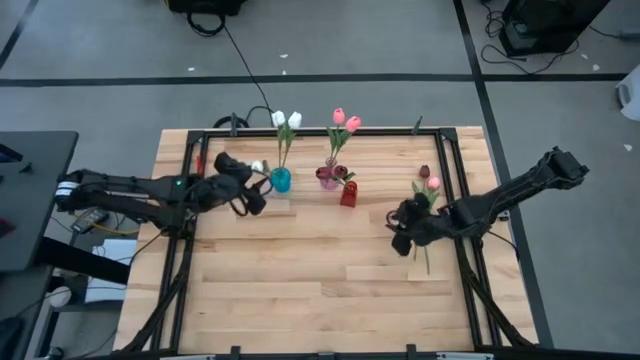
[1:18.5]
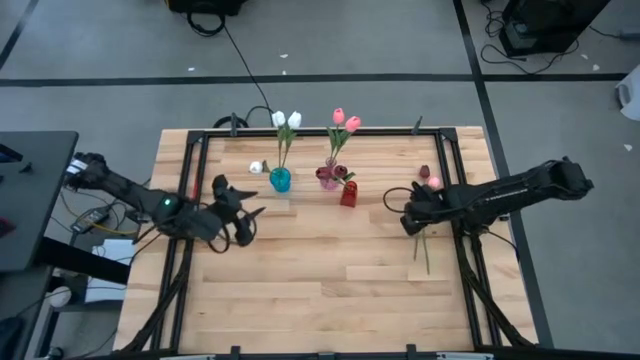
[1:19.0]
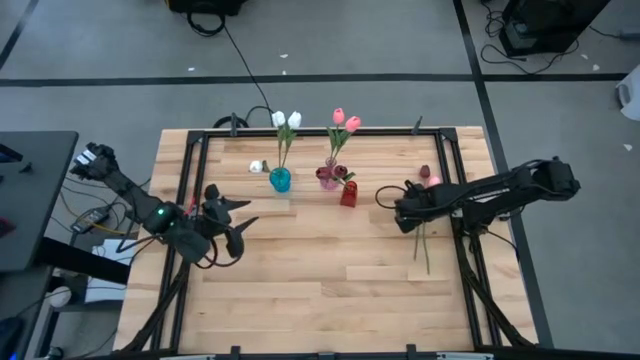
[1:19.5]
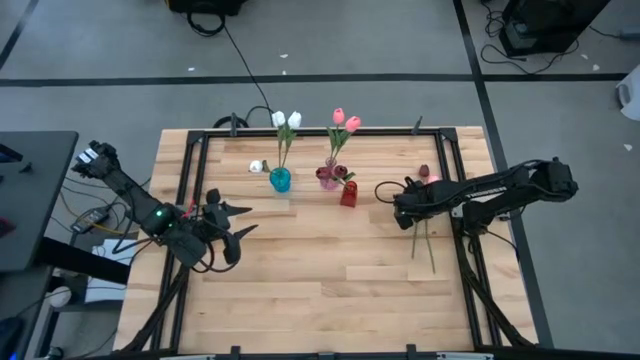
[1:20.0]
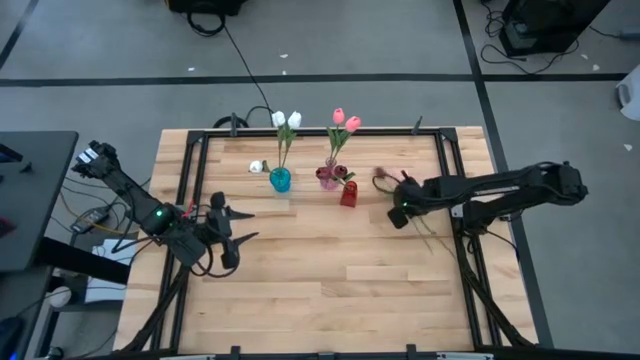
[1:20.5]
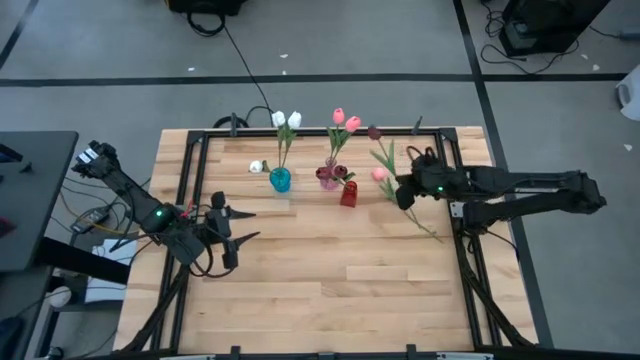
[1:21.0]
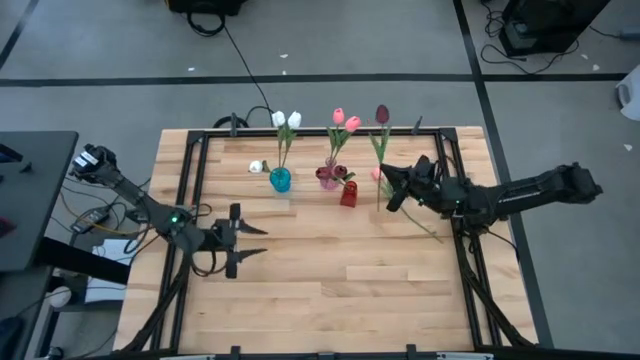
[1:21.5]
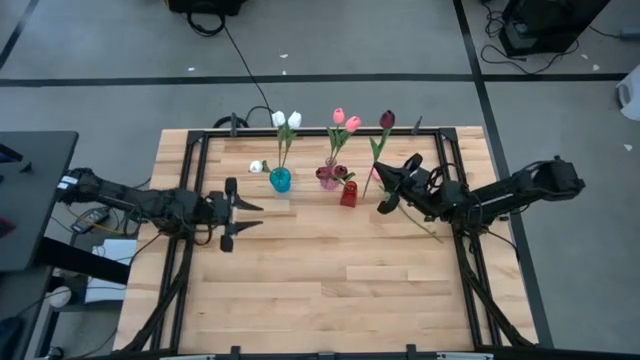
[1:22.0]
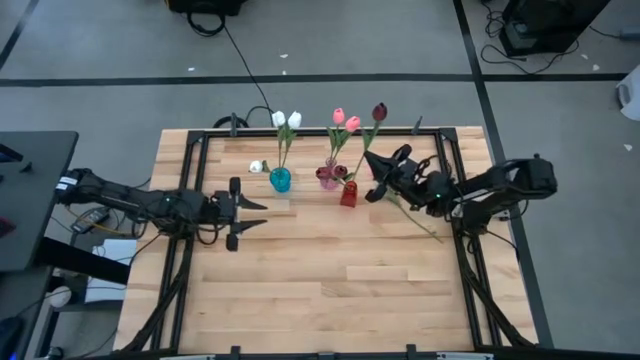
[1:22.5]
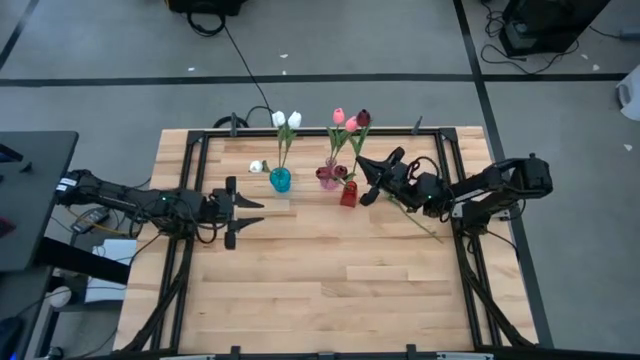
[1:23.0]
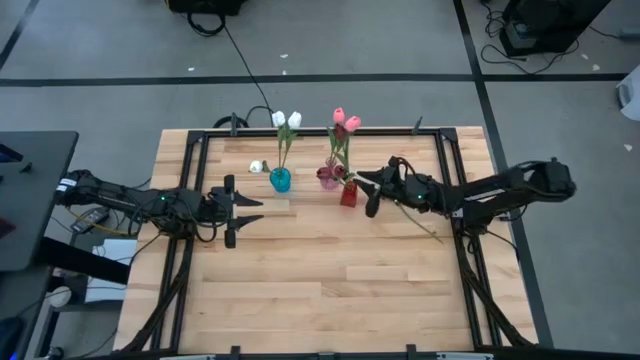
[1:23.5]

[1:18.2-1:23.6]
Task: Sort flowers into vase by color
Put the red tulip into the red vase

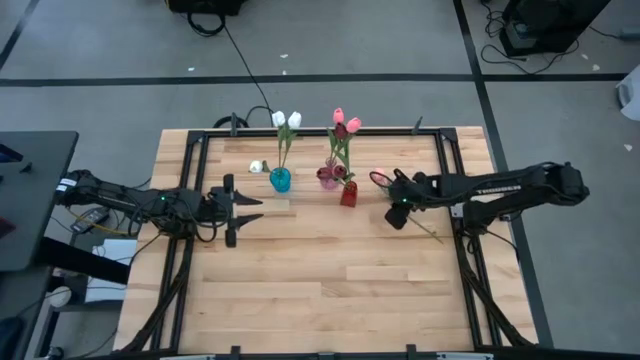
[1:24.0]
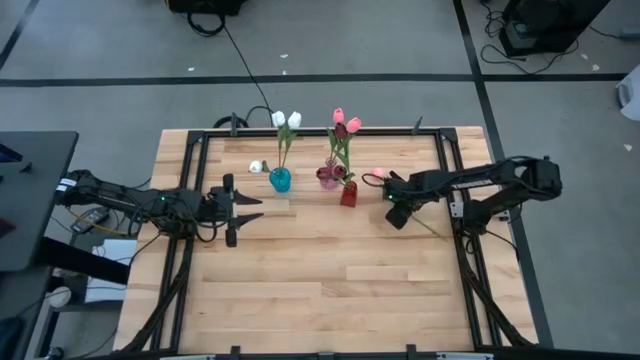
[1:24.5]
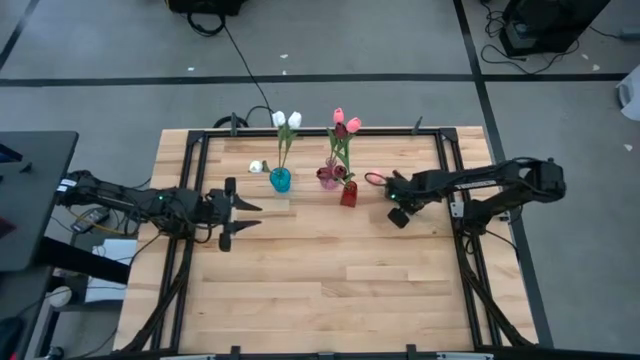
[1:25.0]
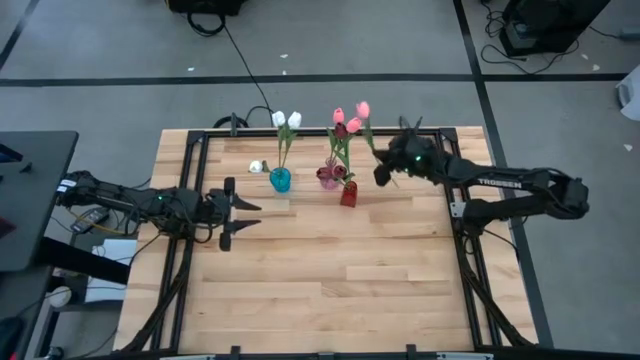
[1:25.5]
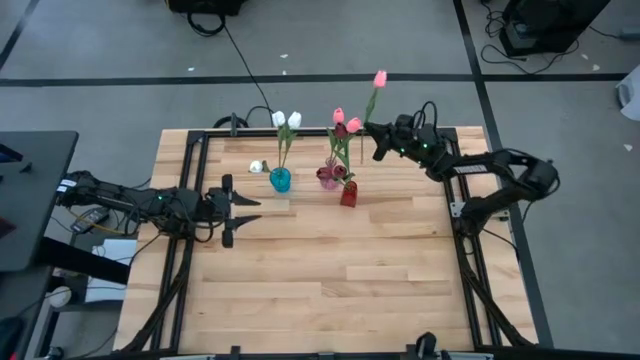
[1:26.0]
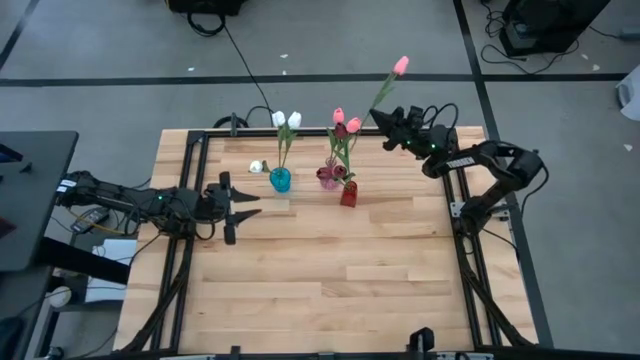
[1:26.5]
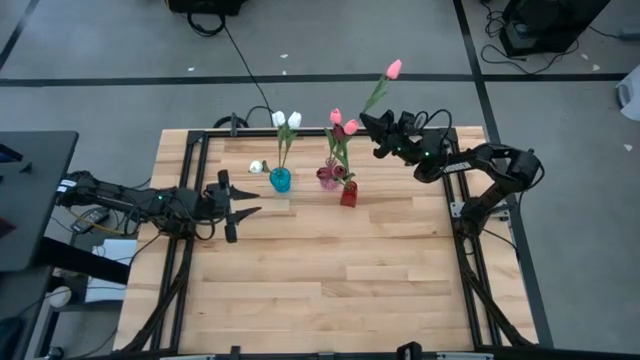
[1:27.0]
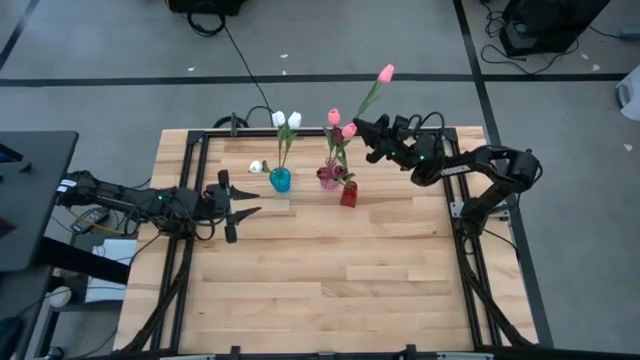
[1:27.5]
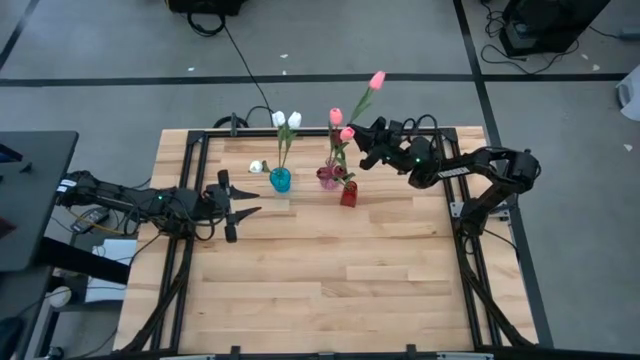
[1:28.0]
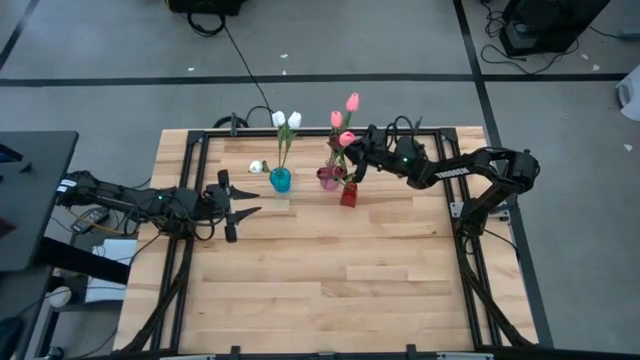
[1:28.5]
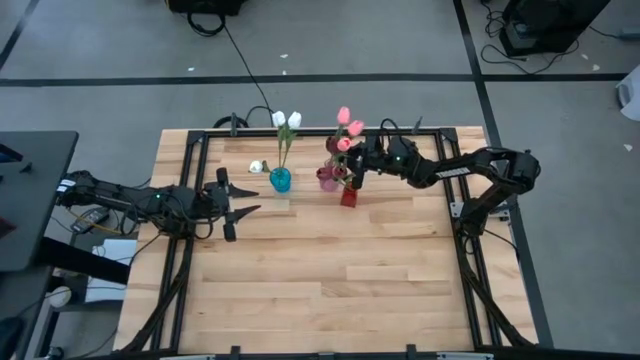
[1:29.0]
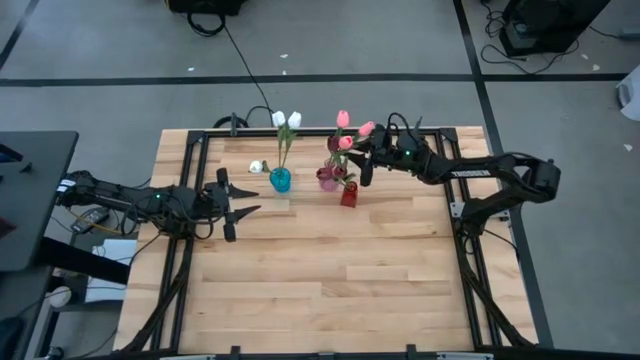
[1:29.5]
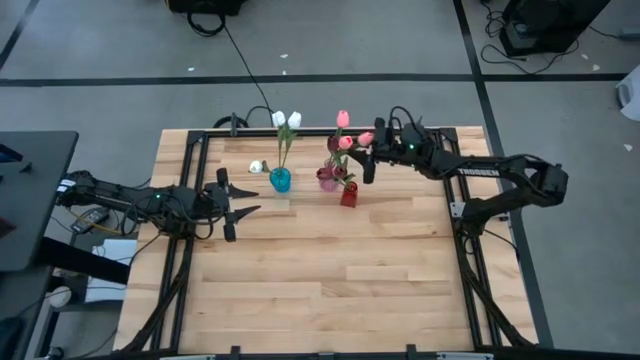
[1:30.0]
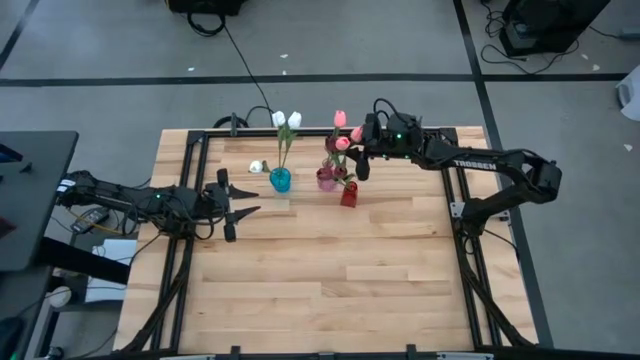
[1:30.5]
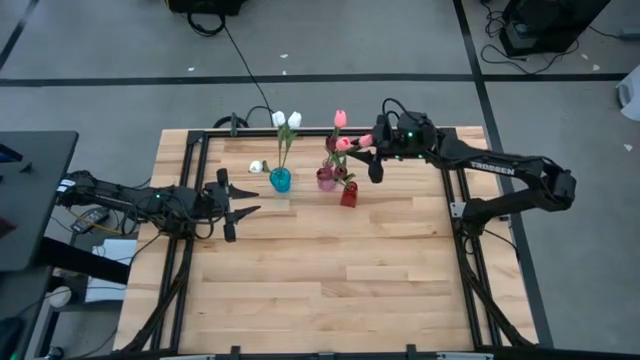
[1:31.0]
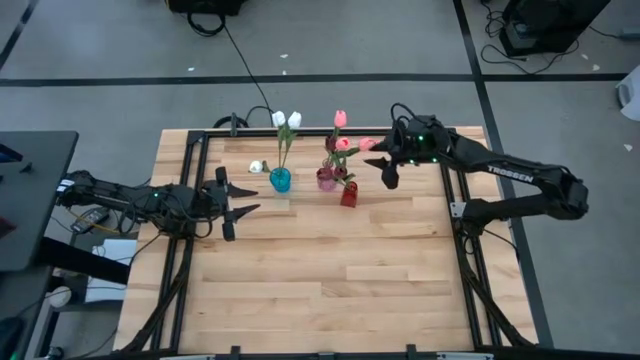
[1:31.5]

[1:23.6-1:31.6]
Put the pink tulip into the pink vase

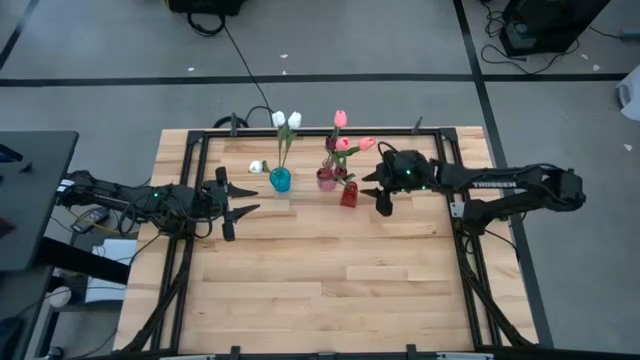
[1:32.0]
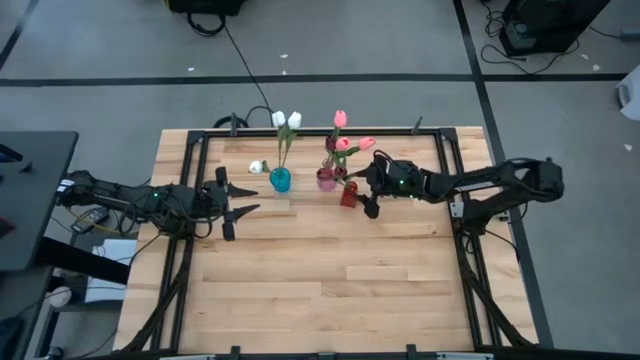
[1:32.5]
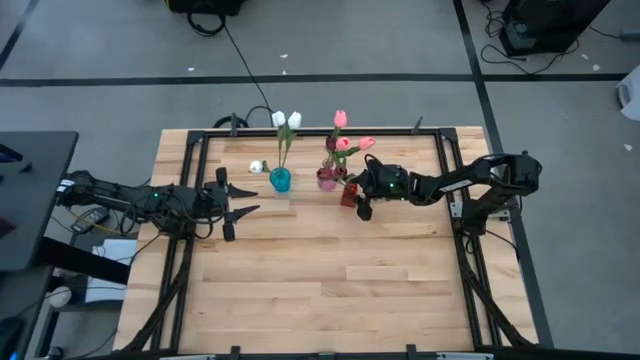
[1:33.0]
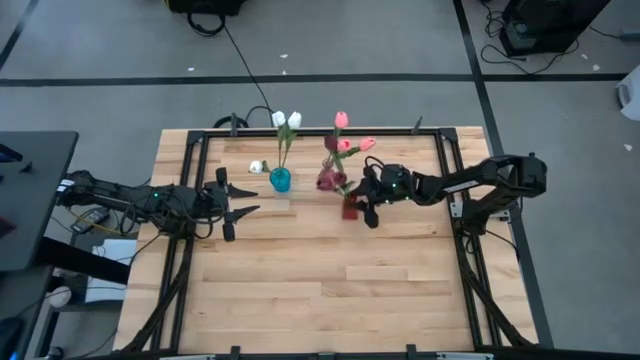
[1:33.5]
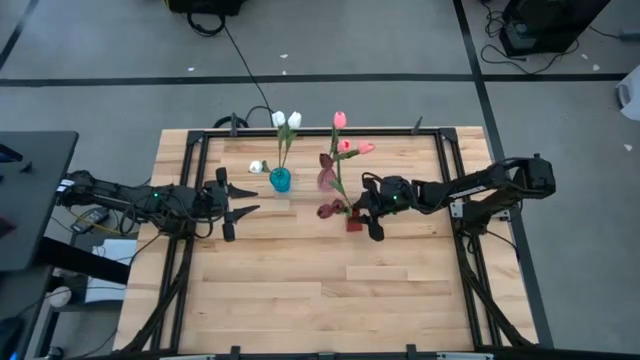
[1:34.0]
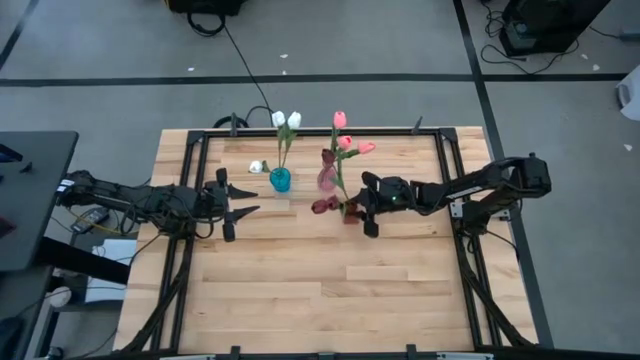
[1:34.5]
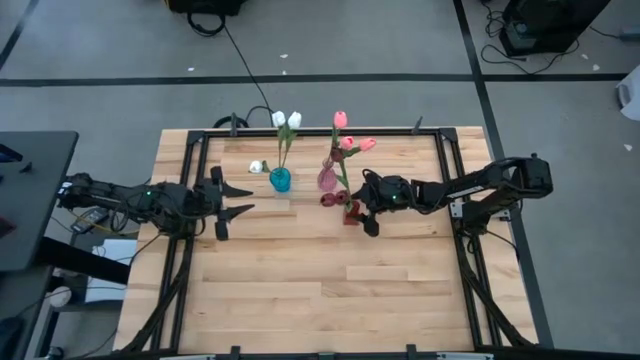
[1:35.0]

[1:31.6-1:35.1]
Adjust the red vase

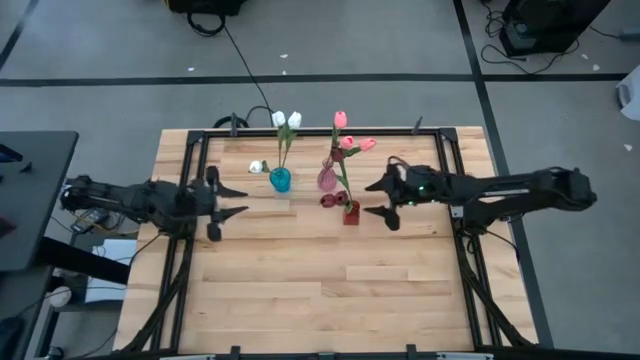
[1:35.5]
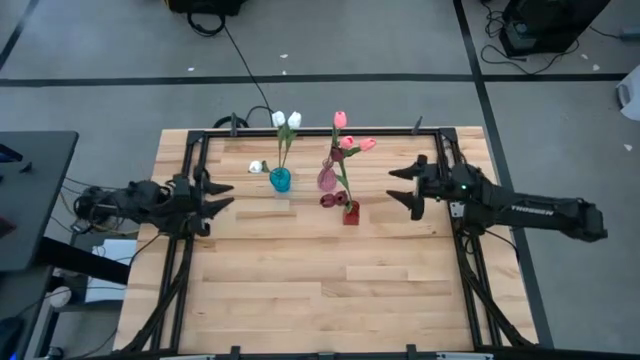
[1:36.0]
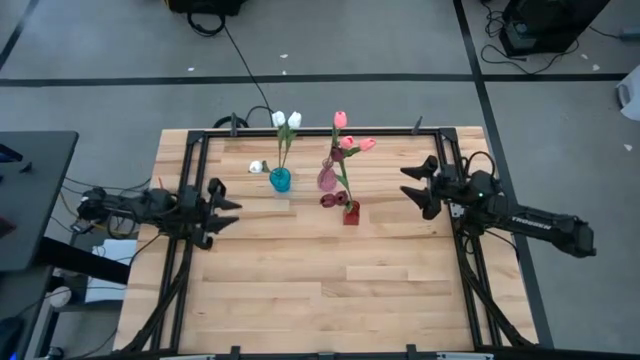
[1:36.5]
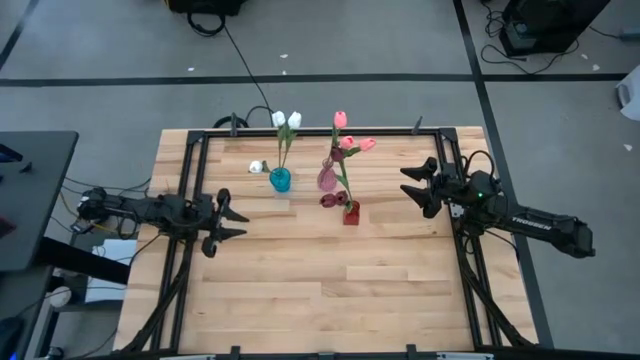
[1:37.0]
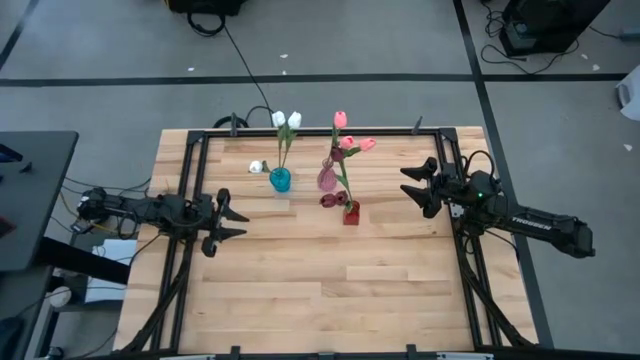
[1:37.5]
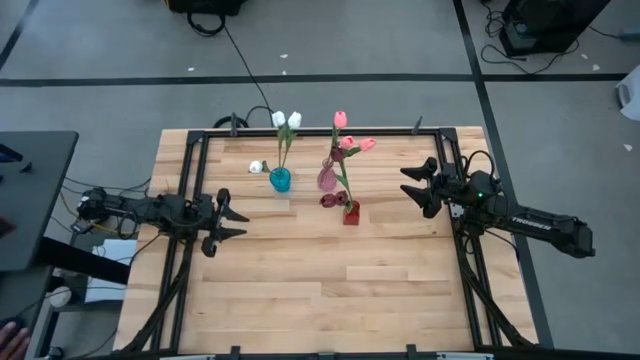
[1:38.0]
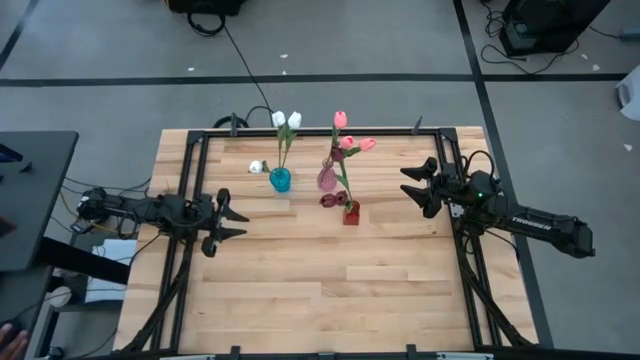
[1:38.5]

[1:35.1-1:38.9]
Return to Home Position

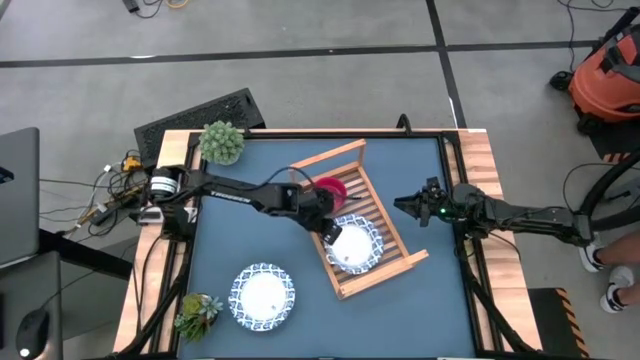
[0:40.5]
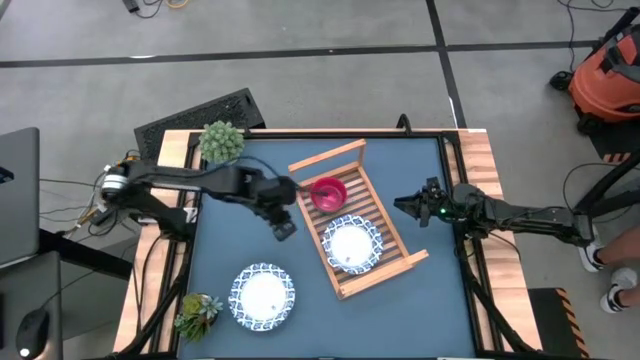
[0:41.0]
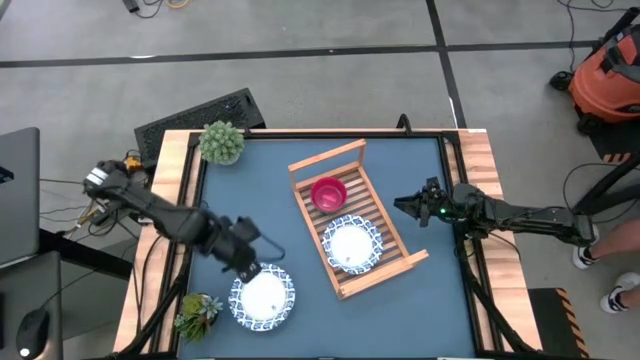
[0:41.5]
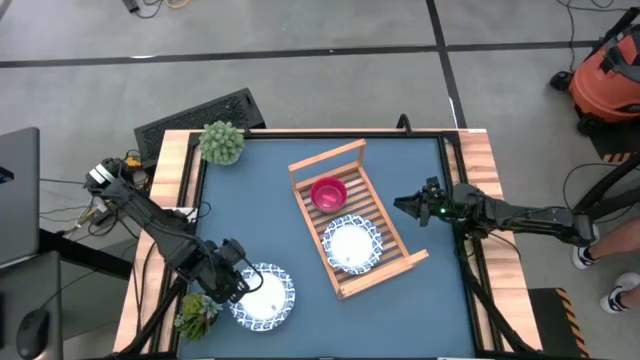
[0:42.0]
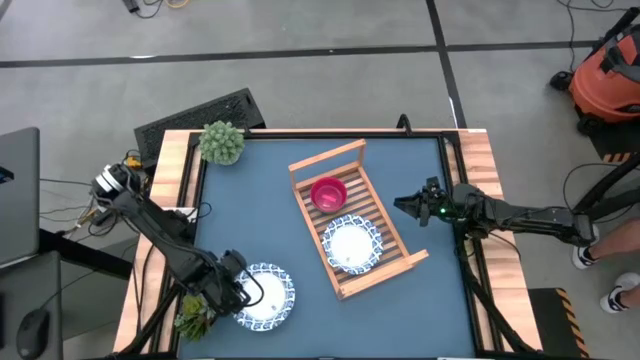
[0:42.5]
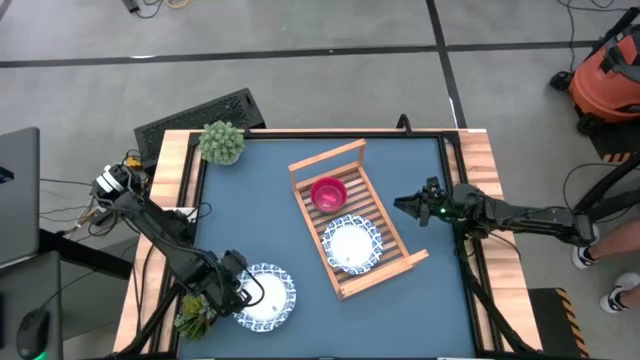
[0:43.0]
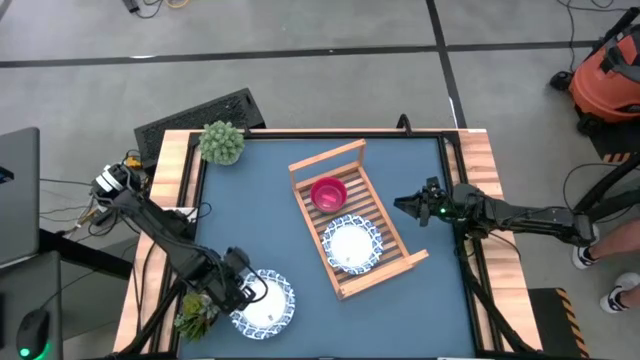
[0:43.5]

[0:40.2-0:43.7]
Task: Place and stack bowls onto a shelf
Stack the white blue bowl on top of the white blue bowl on the shelf
